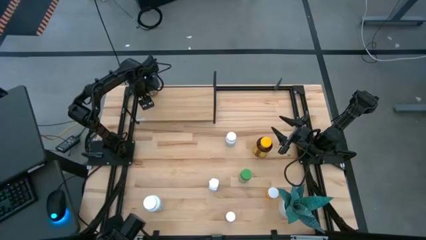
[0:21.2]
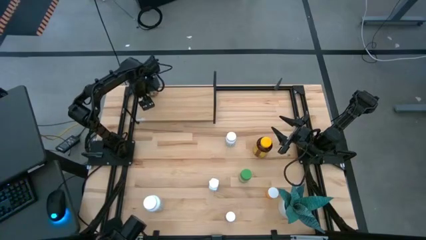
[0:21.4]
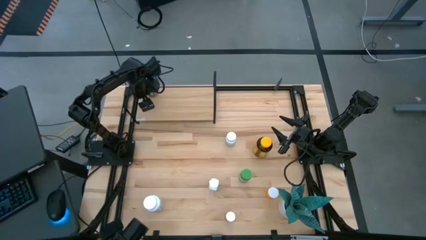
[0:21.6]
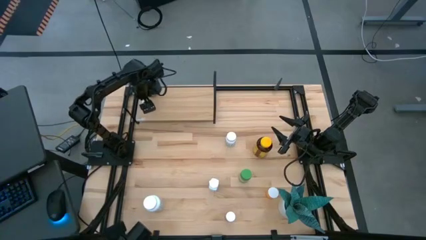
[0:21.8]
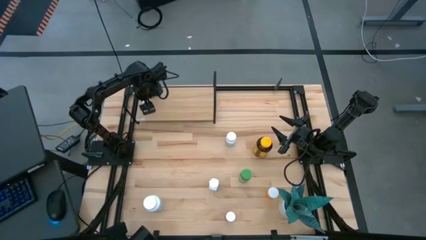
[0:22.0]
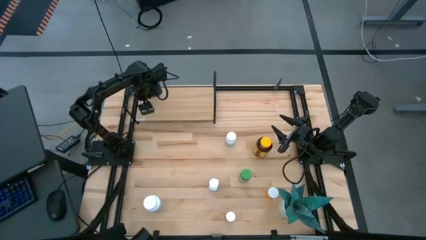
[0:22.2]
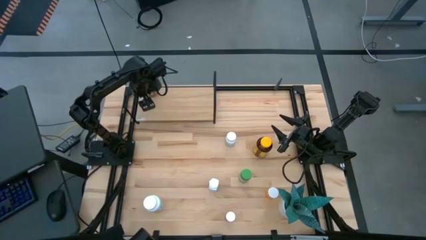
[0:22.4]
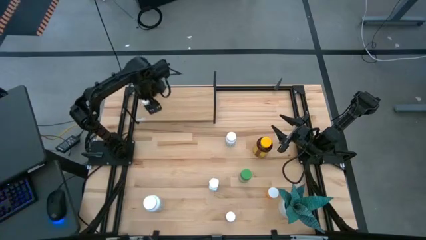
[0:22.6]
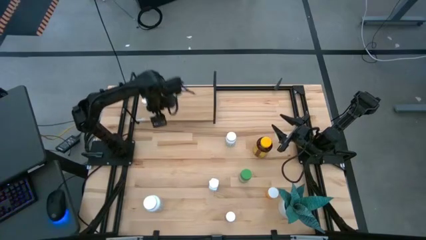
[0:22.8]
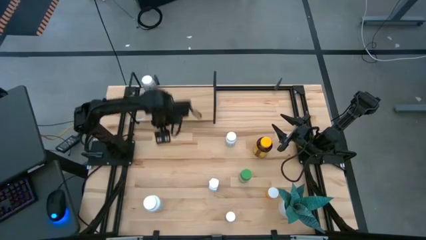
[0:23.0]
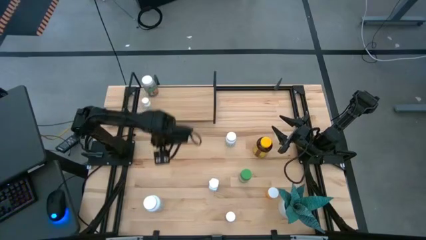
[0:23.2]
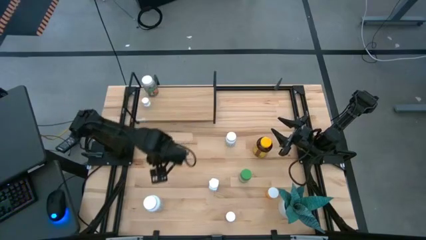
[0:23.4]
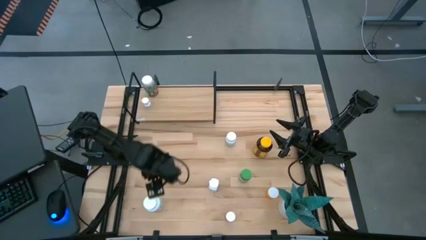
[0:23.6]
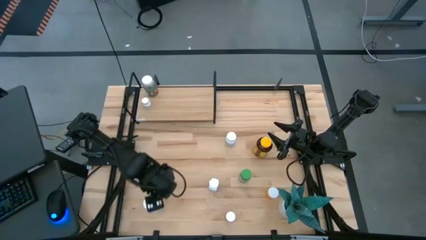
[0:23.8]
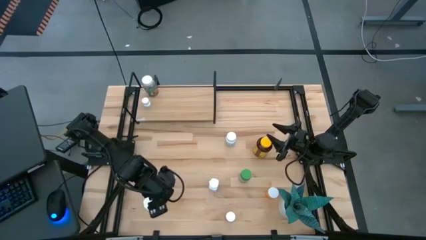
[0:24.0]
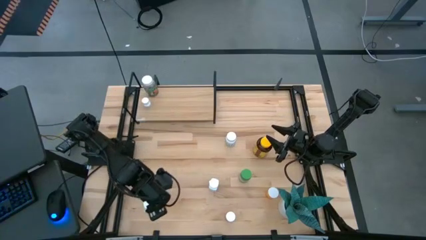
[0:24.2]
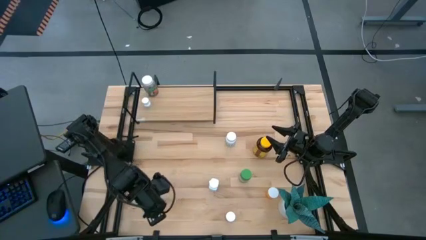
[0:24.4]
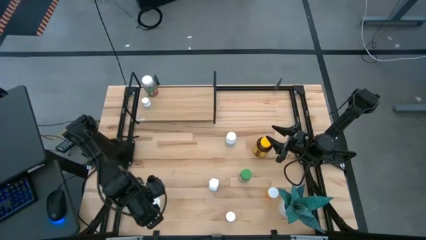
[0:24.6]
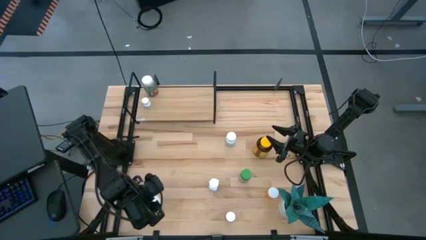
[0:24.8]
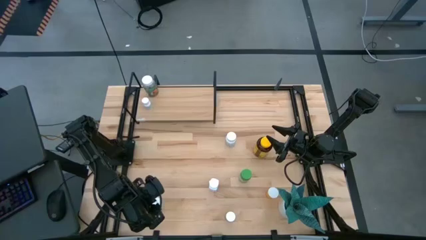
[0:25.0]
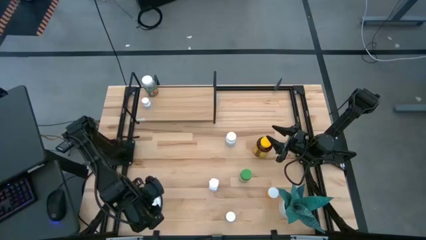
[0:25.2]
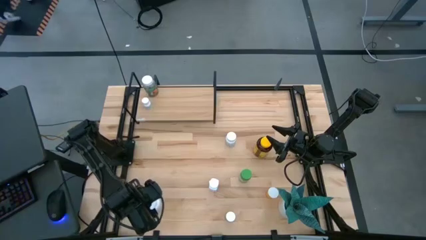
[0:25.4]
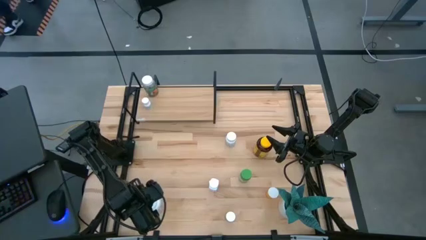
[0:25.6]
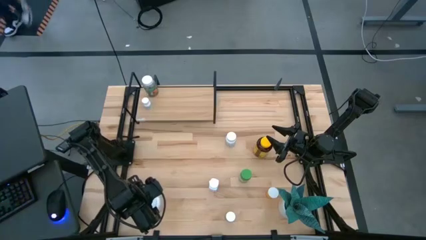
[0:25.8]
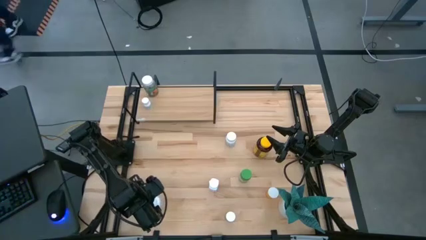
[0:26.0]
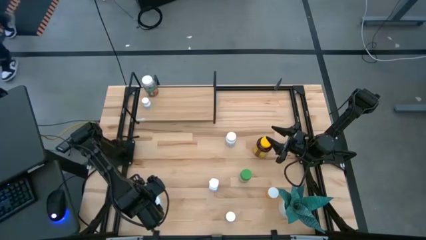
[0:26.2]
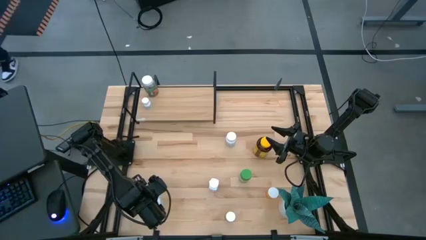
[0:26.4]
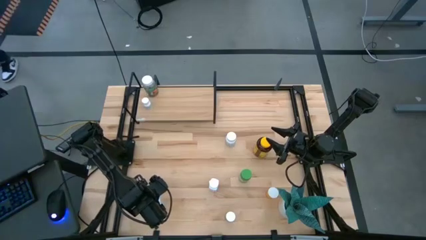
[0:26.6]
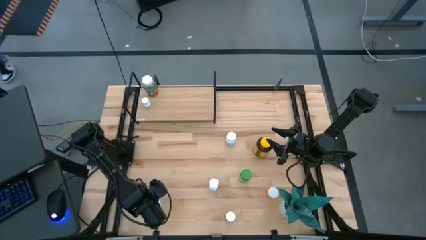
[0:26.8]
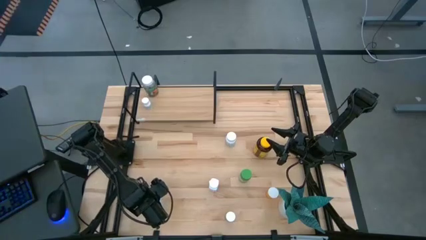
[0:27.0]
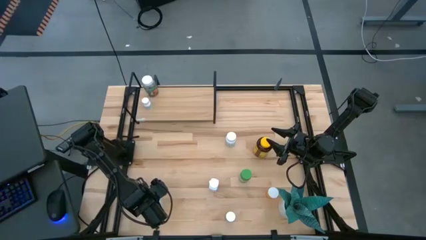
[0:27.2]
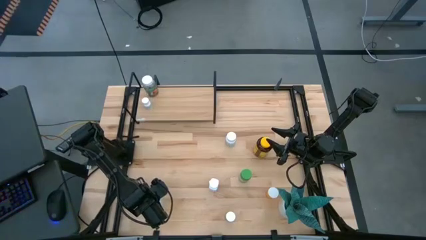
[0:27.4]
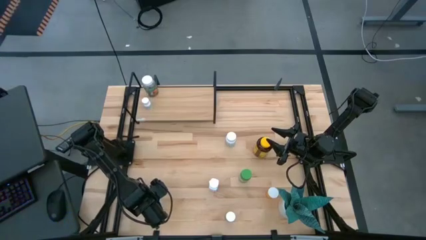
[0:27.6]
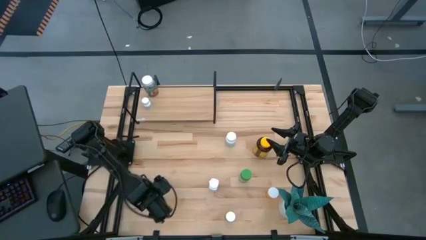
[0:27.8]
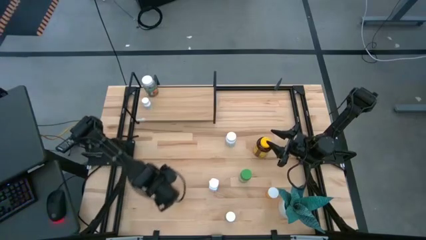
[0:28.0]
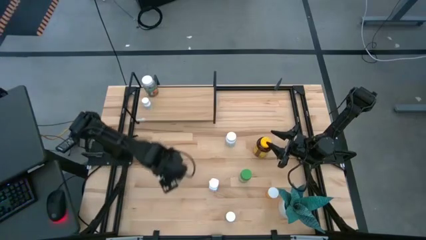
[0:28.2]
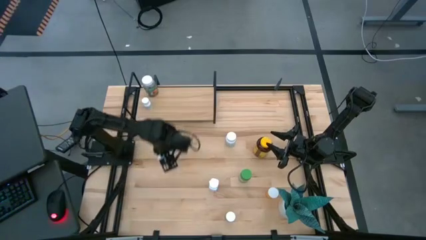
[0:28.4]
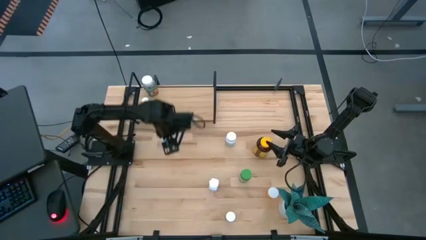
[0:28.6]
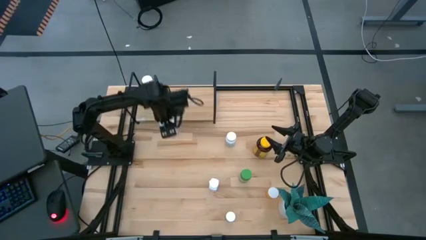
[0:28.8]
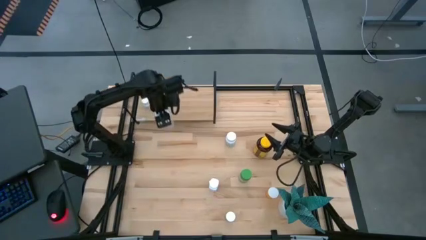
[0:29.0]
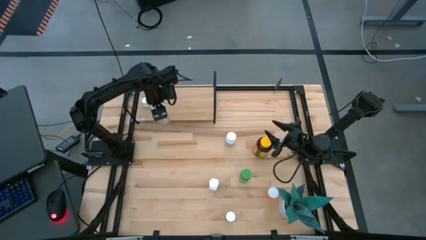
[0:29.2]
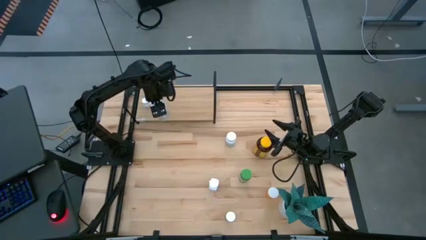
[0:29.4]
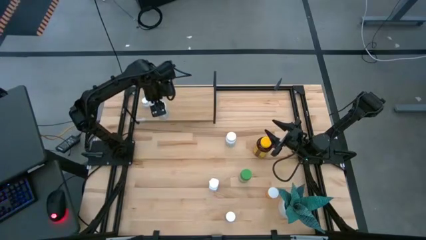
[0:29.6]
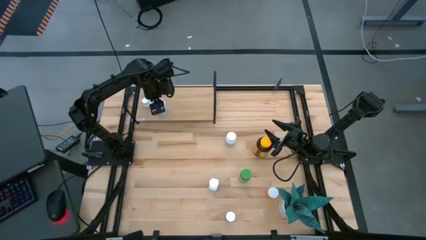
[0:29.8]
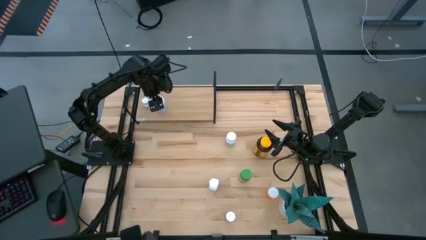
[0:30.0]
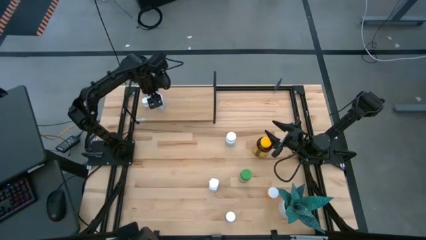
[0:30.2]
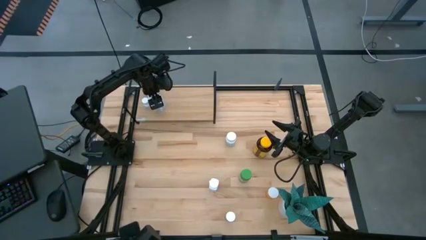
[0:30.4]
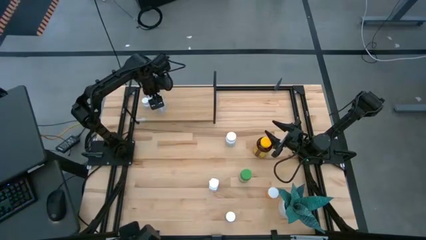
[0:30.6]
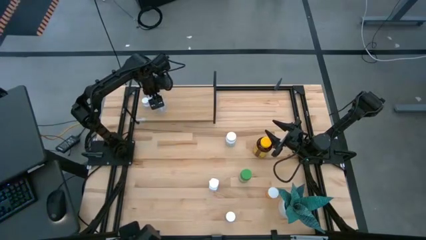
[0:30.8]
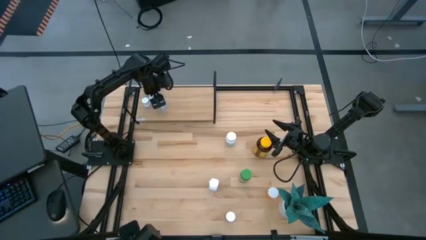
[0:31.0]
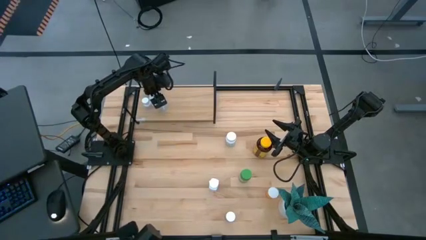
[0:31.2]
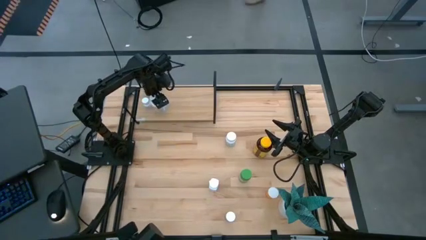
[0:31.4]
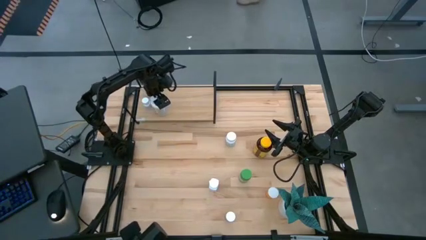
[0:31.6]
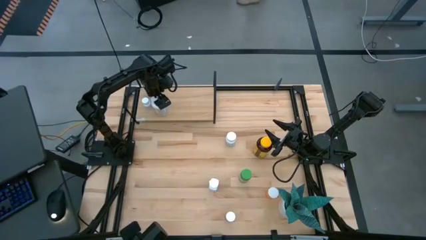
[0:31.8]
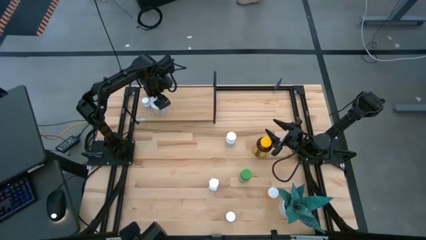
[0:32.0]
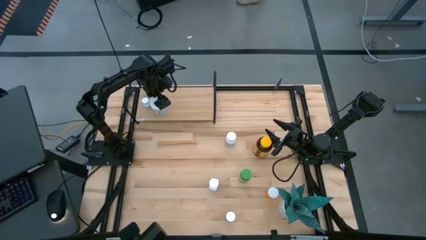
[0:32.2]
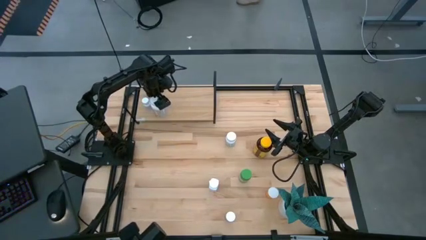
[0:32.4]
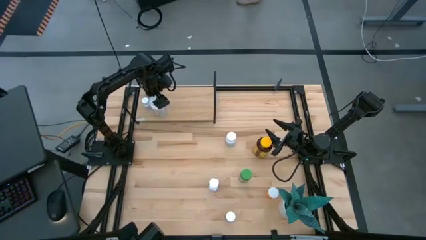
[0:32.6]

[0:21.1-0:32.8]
Task: Pick and place medicine bottles onto shelf by color
Put the white pill bottle on the shelf
